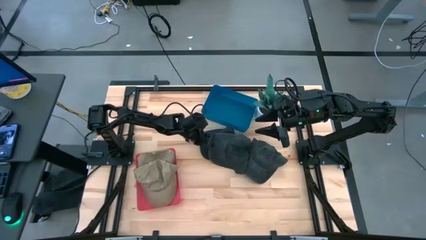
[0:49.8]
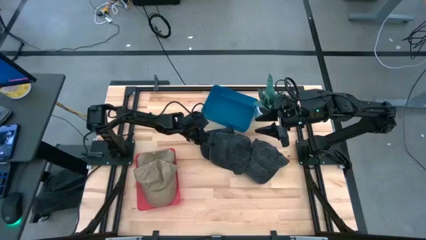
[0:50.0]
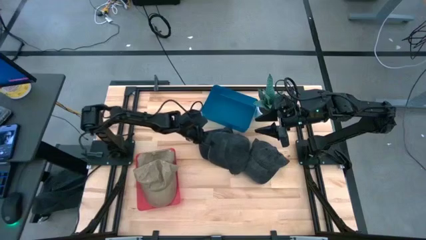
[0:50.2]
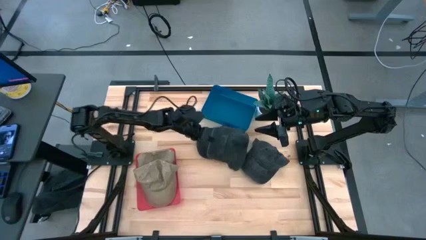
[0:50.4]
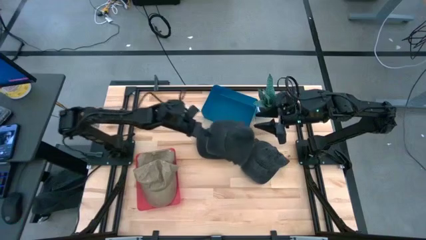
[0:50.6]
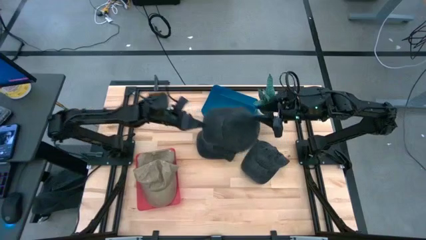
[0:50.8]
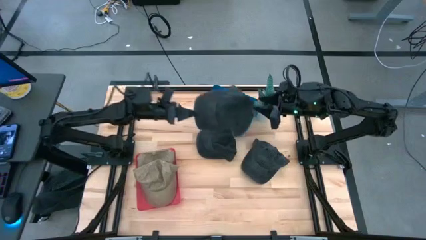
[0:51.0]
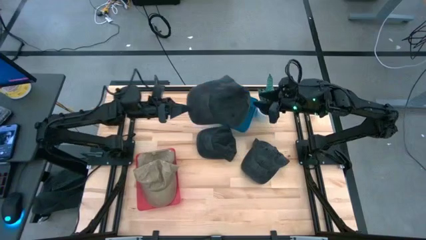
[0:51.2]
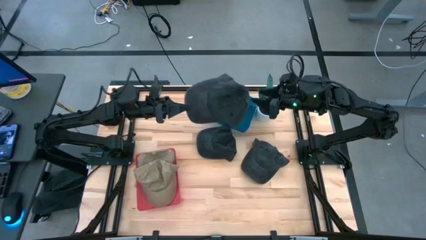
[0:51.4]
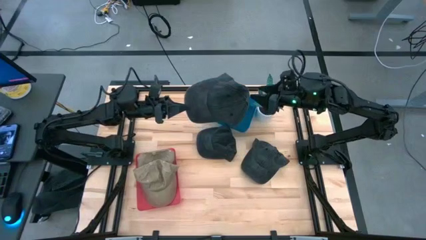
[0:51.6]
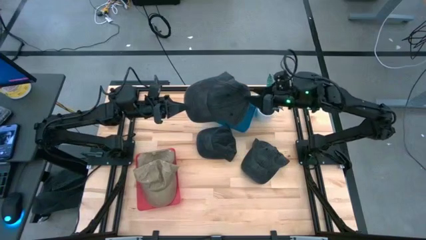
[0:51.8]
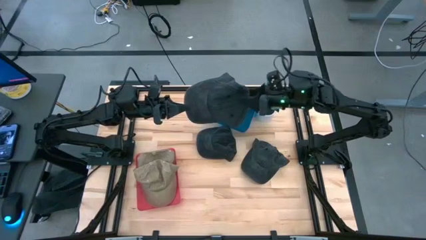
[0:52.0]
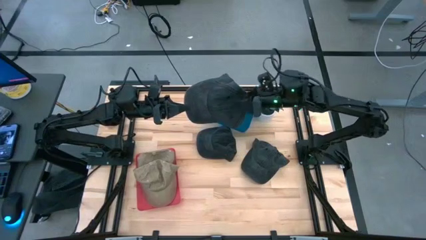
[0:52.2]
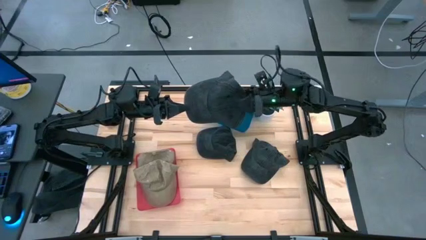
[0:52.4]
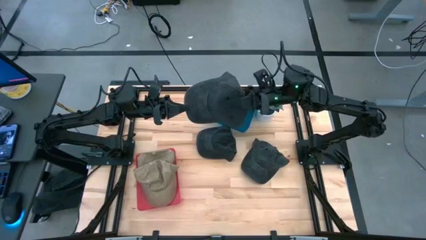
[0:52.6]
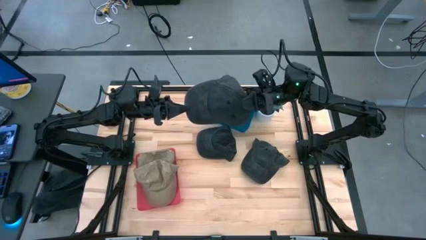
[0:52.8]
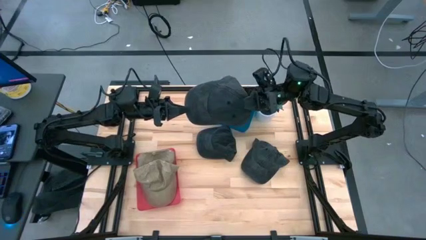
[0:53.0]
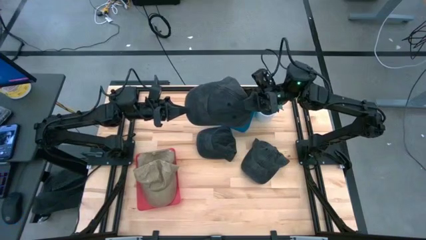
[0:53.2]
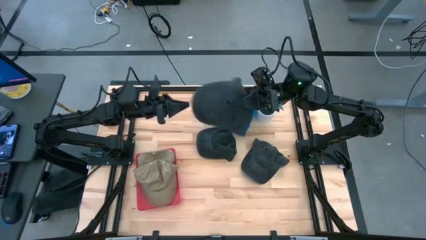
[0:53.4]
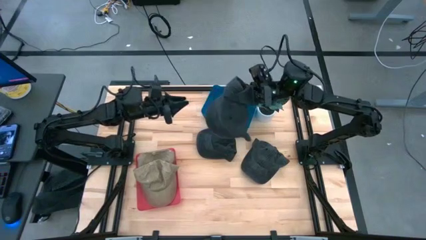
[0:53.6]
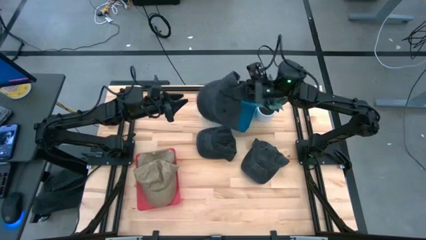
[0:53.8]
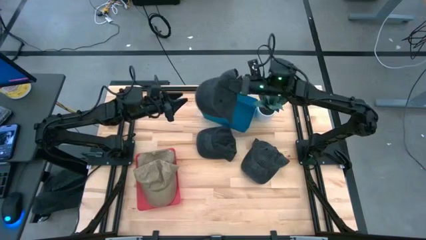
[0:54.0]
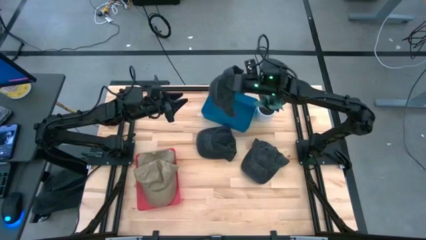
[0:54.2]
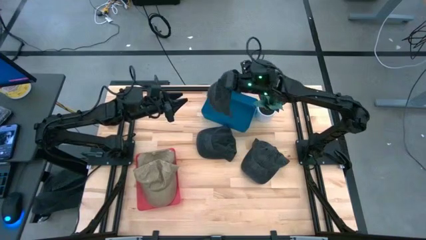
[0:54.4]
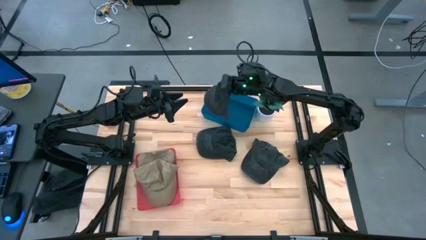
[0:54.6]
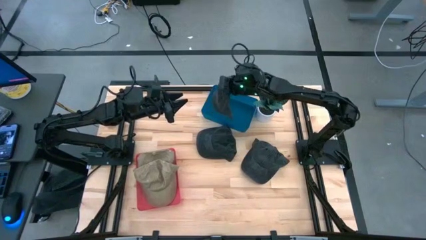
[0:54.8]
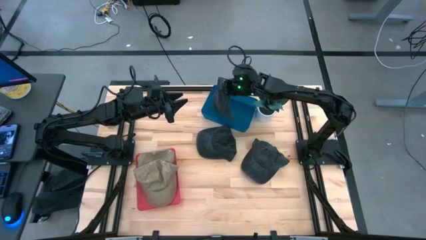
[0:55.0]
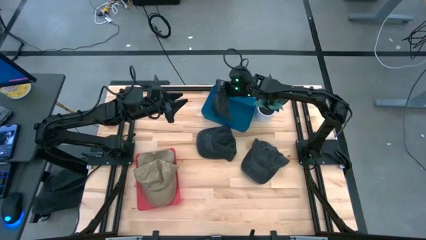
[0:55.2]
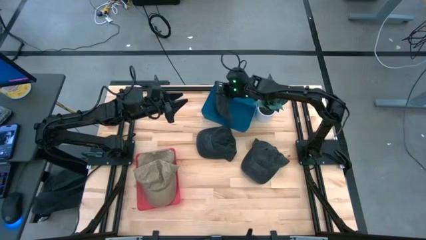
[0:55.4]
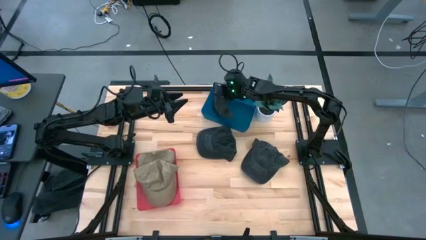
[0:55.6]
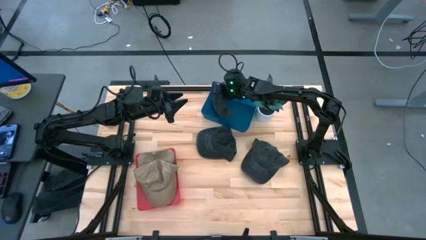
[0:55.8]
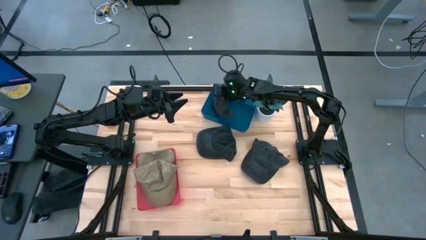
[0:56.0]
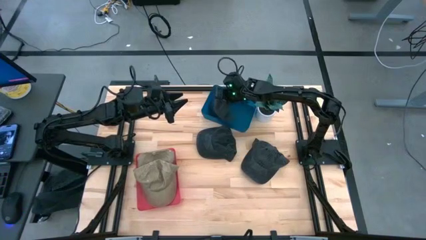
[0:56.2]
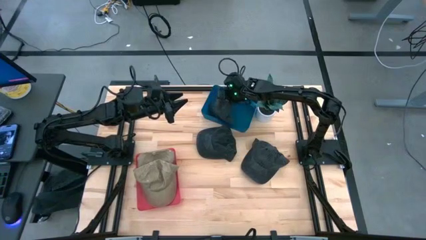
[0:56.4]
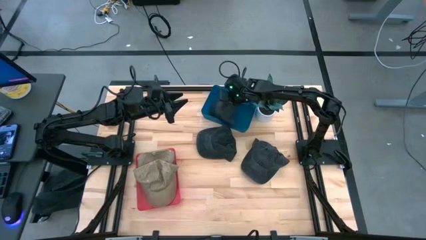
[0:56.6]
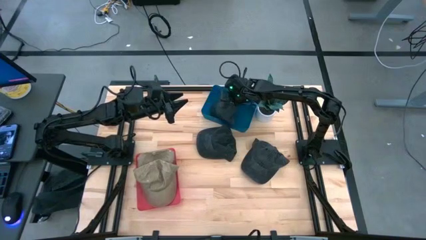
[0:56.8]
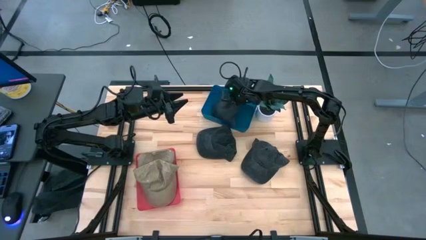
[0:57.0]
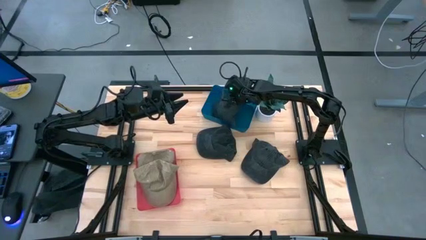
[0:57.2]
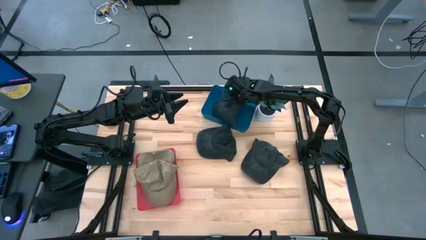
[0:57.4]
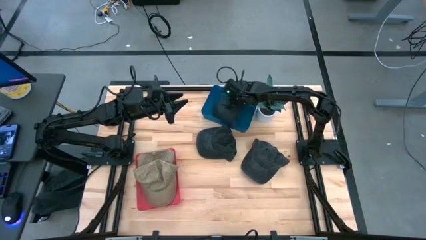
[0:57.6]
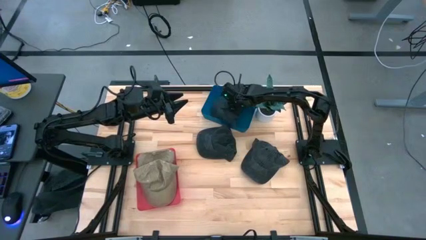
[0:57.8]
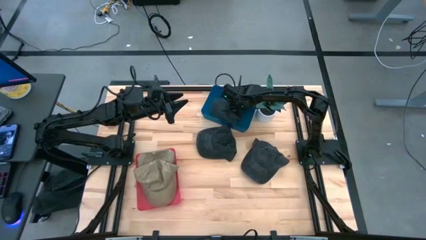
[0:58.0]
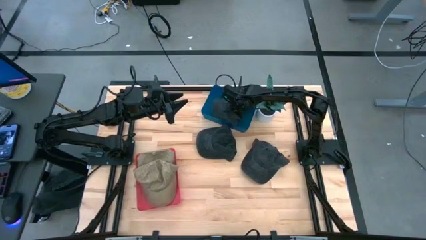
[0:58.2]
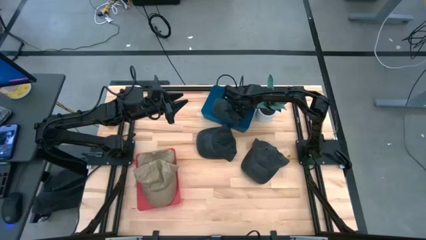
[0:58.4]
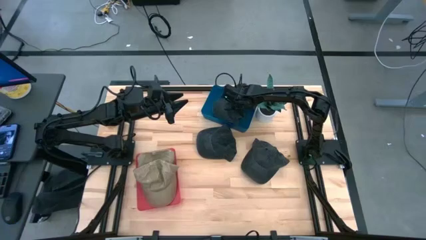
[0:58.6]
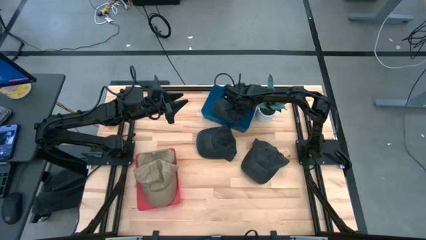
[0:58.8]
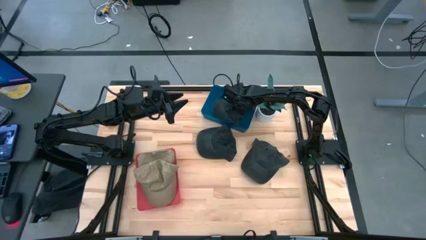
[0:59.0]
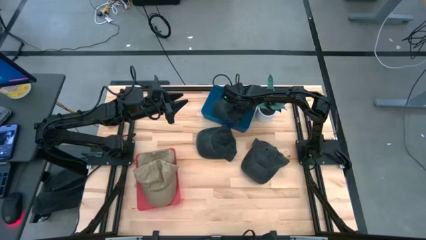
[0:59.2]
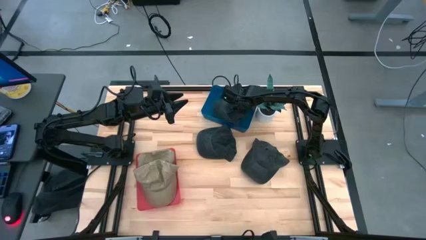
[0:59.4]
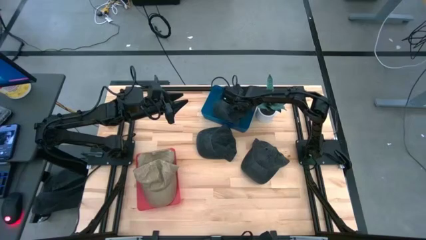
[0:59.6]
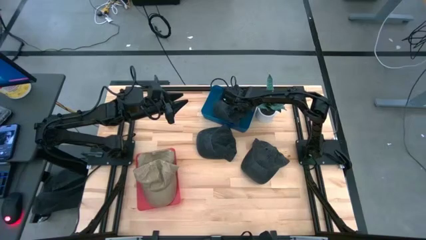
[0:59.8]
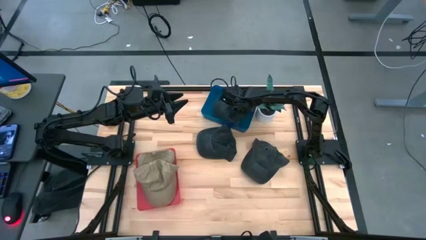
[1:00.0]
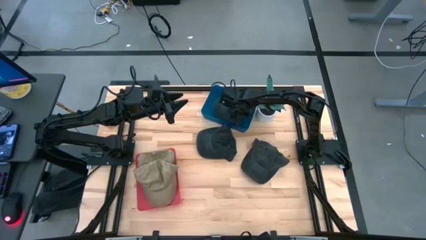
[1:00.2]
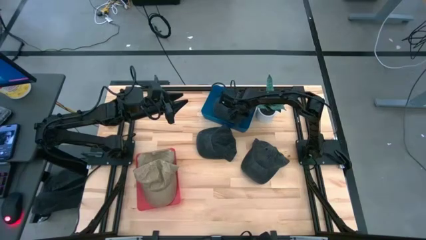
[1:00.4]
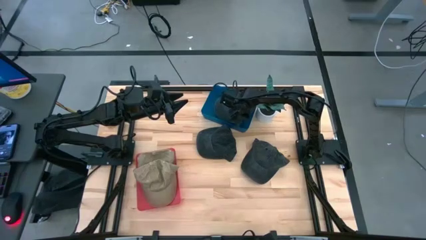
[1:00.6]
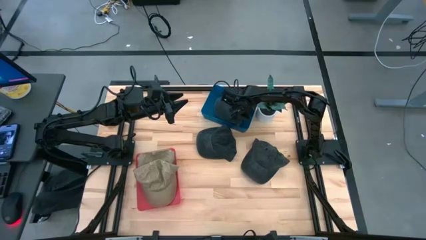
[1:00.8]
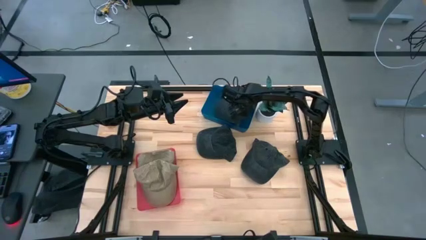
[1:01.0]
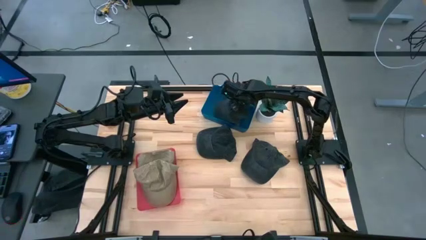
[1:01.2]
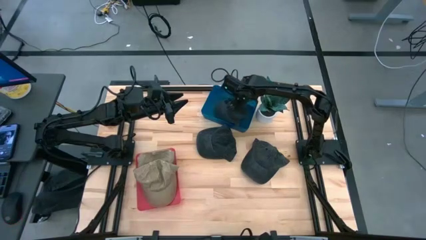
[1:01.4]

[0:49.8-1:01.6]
Task: Pick & Place hat
Put the middle black cap into the blue bin

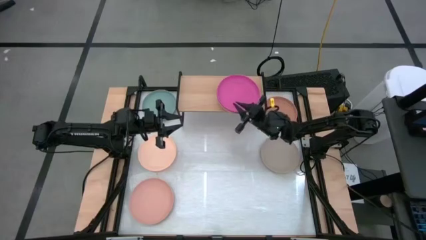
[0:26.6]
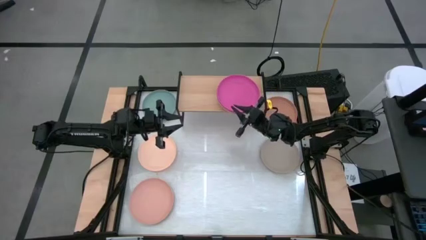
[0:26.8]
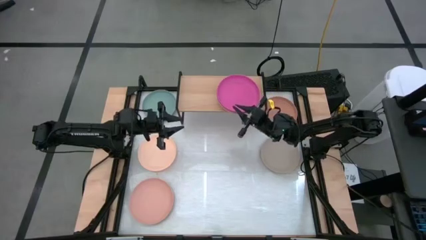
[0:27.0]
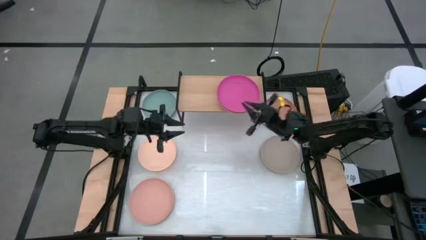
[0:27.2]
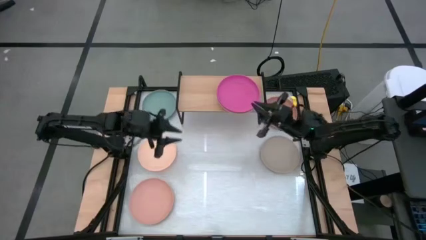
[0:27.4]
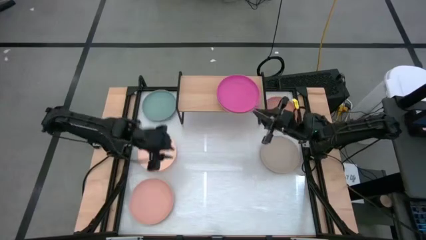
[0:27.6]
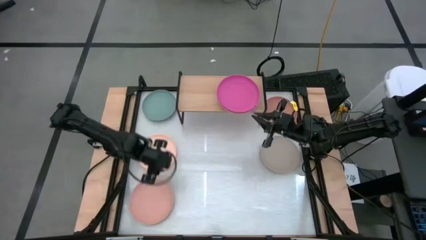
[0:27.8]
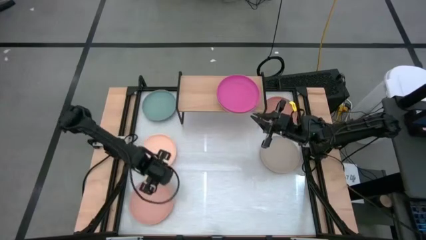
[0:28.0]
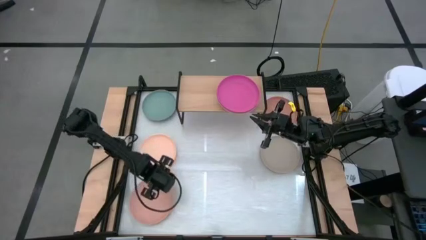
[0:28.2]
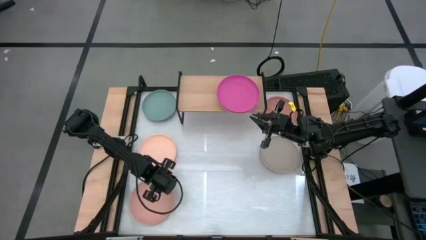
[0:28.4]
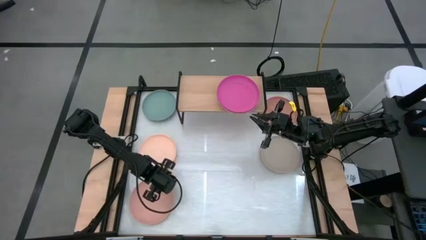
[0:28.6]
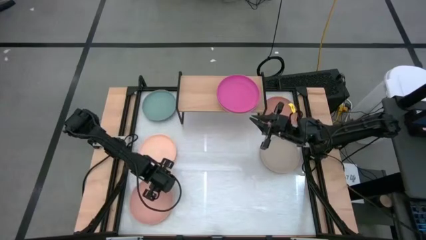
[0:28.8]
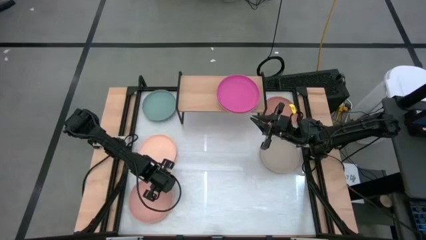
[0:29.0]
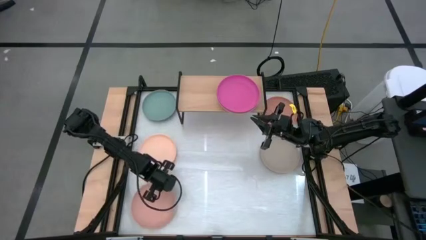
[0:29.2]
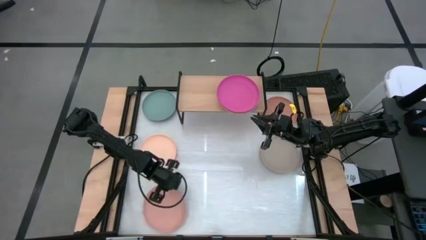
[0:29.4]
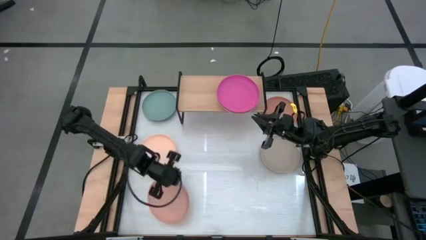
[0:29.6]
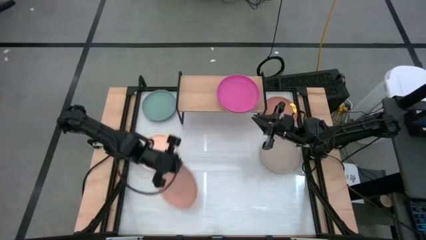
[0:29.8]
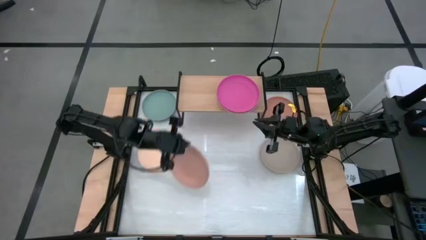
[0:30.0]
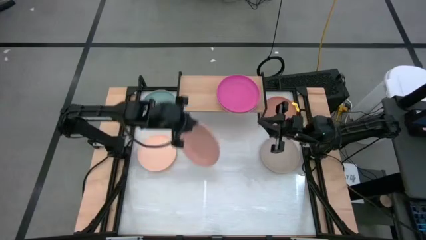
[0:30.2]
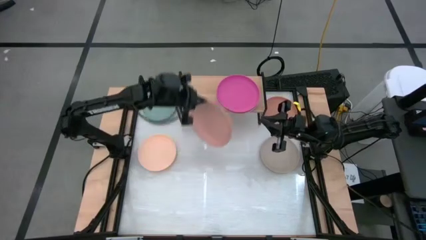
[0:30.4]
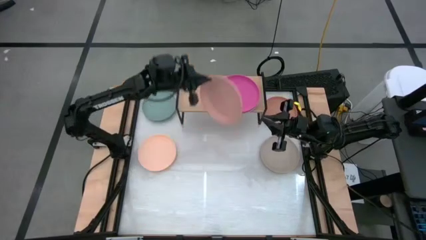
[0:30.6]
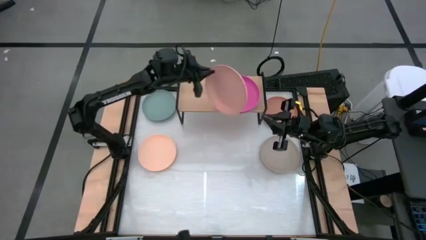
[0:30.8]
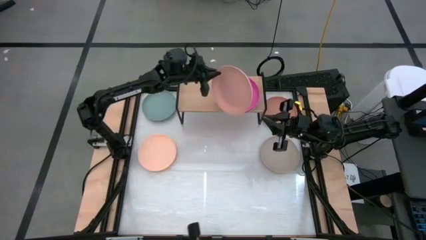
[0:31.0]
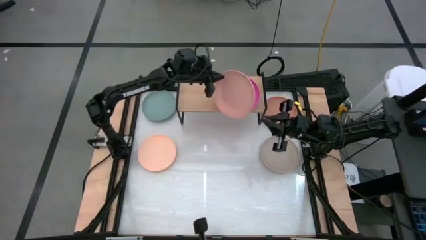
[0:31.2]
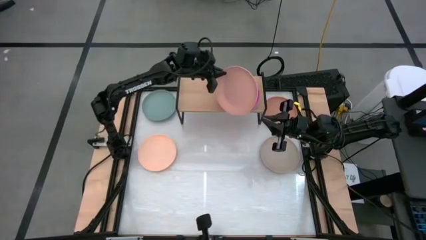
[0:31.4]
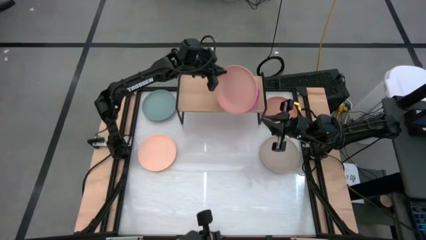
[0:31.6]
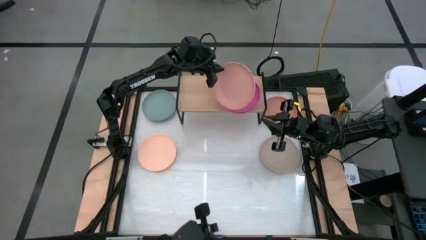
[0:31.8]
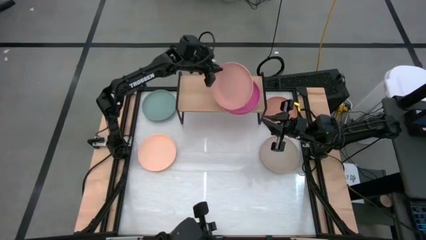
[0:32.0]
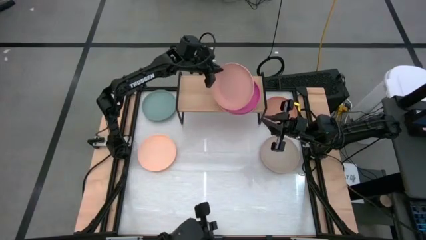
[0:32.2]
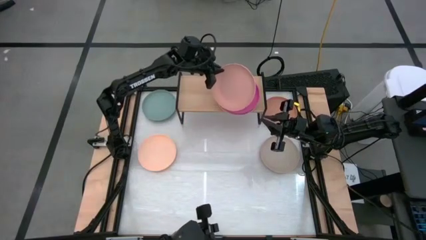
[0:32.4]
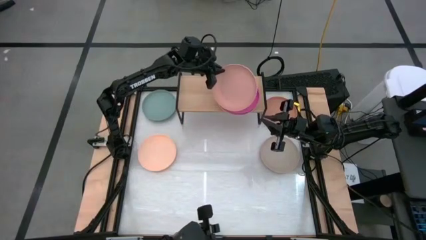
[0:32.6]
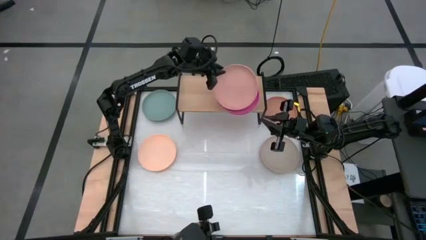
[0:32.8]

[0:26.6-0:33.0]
Task: Place and stack plates onto a shelf
Stack the brown plate on top of the pink plate on the shelf
